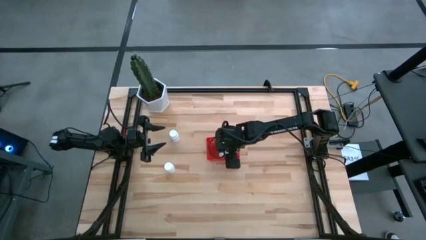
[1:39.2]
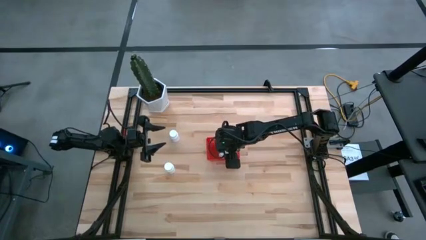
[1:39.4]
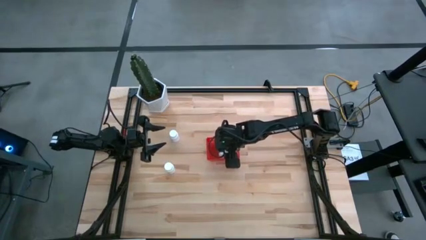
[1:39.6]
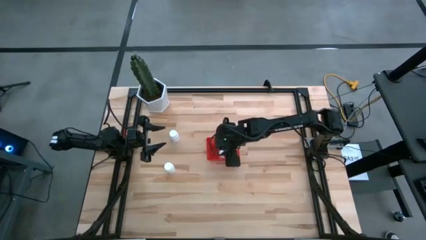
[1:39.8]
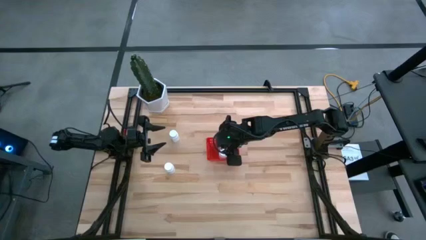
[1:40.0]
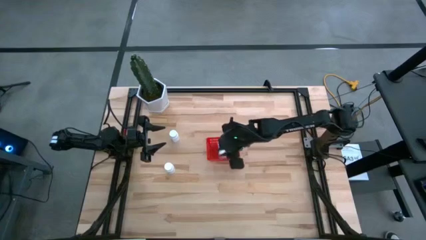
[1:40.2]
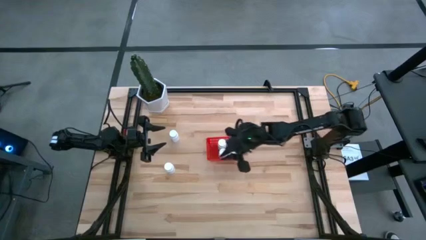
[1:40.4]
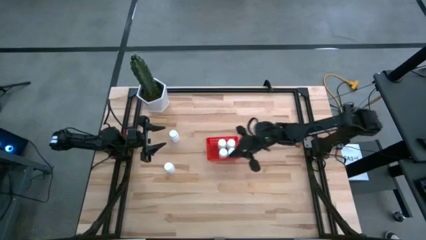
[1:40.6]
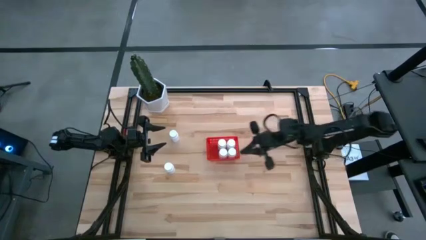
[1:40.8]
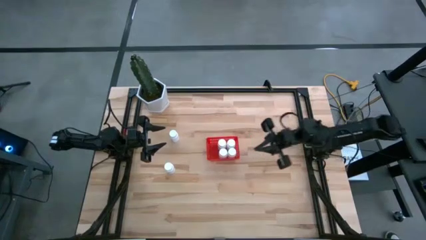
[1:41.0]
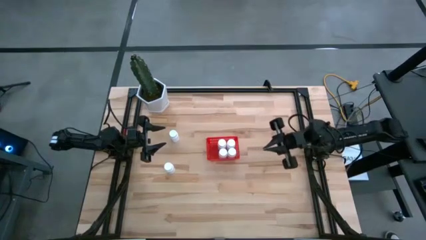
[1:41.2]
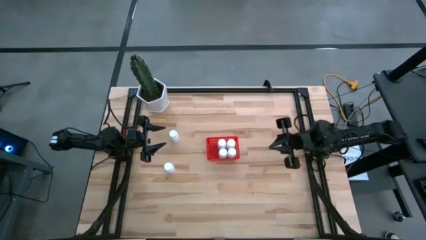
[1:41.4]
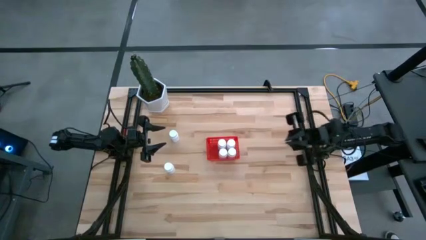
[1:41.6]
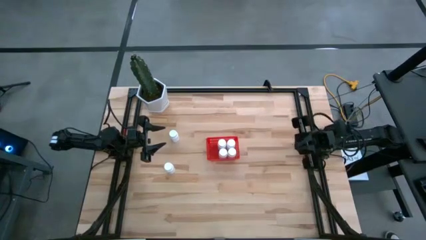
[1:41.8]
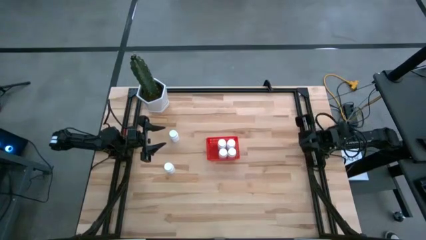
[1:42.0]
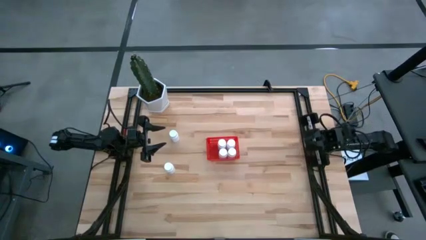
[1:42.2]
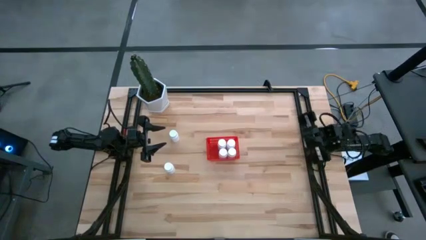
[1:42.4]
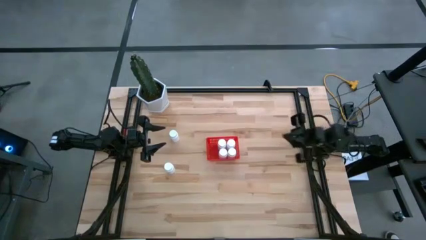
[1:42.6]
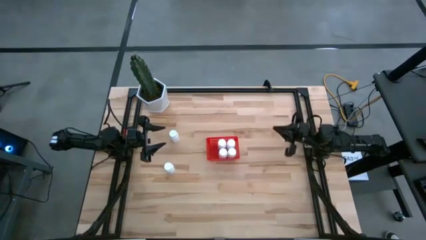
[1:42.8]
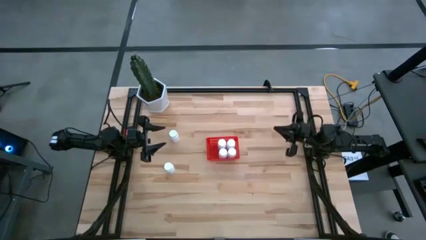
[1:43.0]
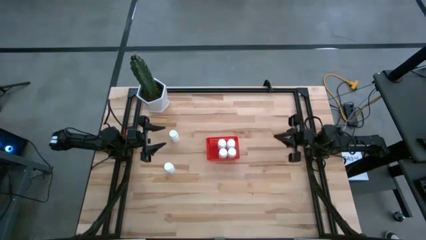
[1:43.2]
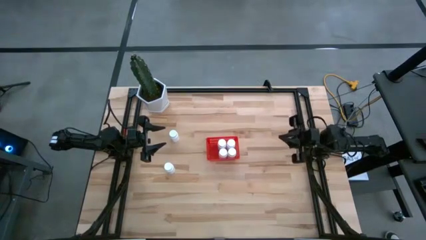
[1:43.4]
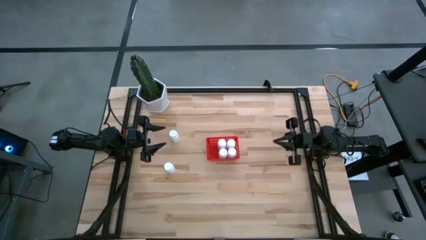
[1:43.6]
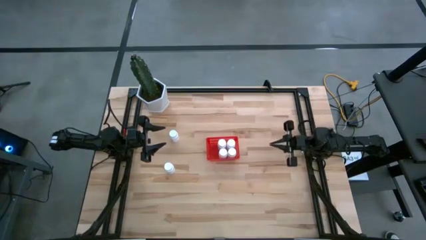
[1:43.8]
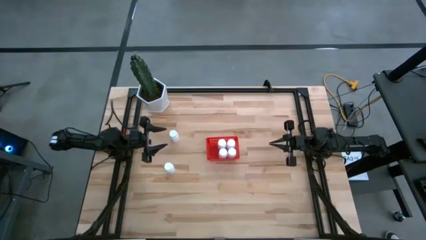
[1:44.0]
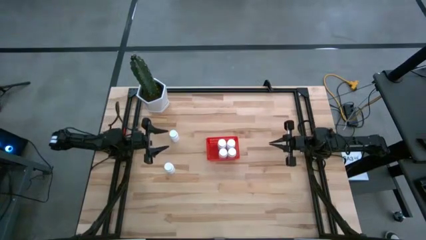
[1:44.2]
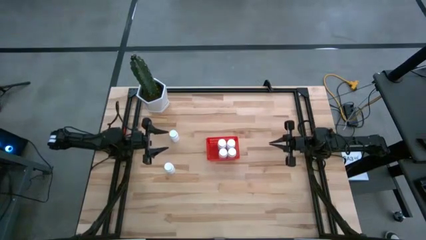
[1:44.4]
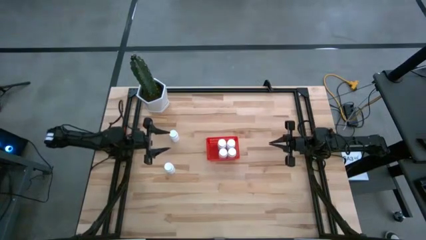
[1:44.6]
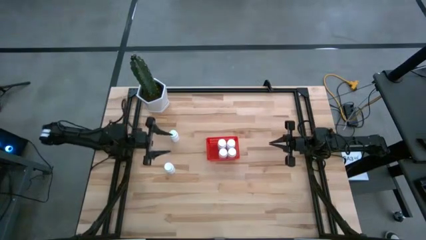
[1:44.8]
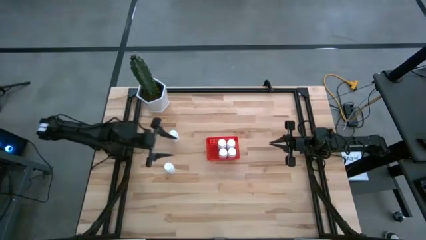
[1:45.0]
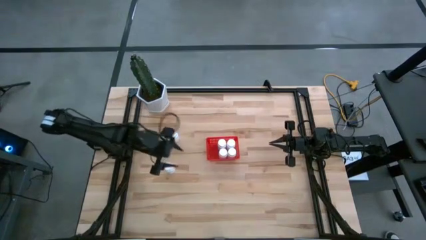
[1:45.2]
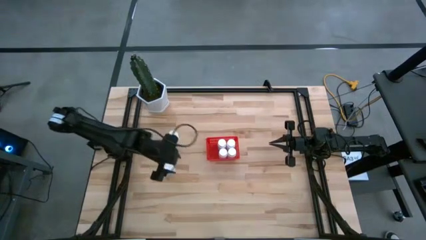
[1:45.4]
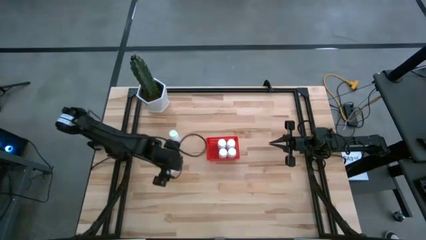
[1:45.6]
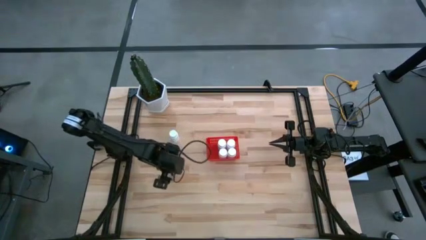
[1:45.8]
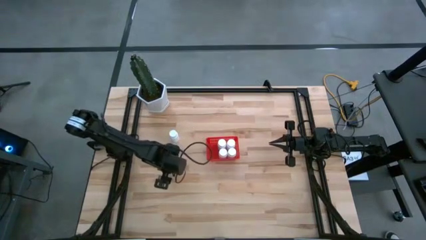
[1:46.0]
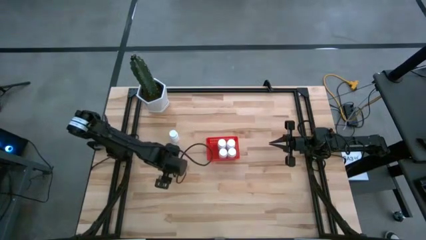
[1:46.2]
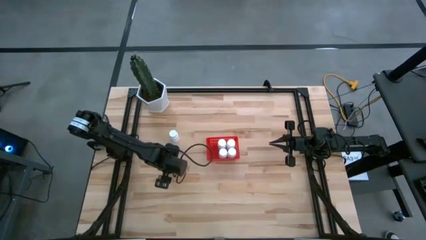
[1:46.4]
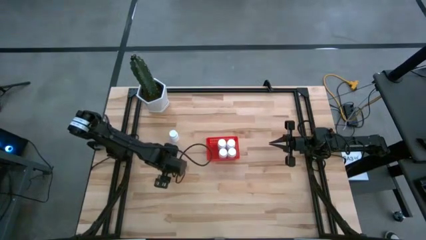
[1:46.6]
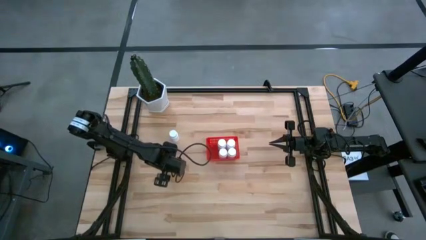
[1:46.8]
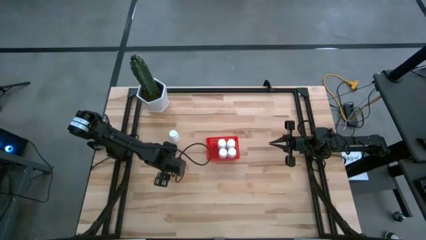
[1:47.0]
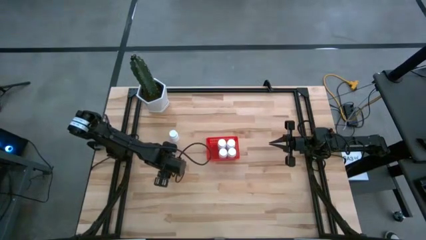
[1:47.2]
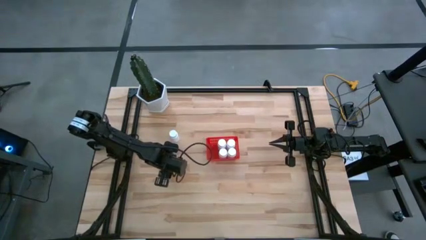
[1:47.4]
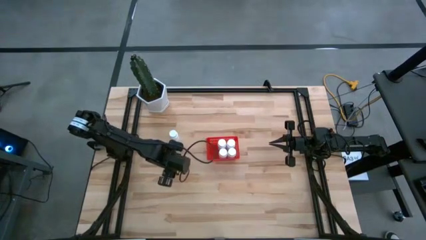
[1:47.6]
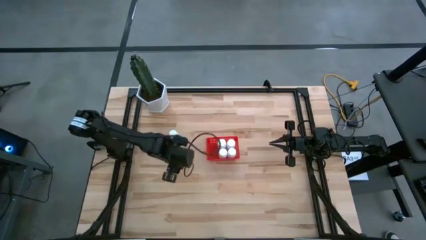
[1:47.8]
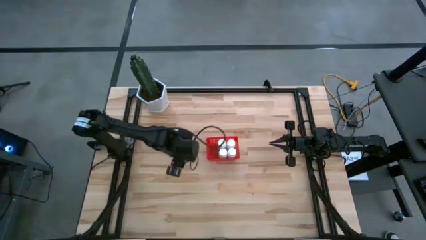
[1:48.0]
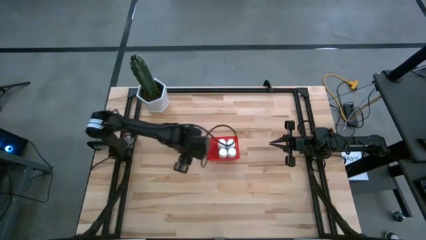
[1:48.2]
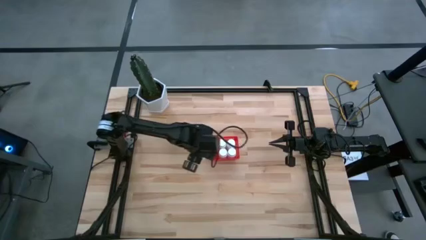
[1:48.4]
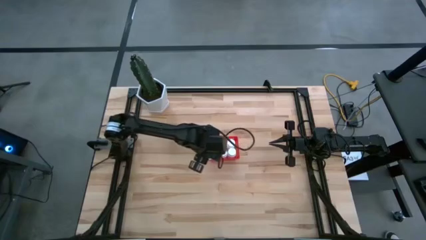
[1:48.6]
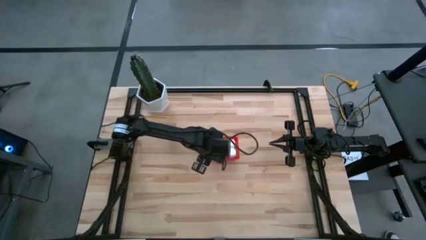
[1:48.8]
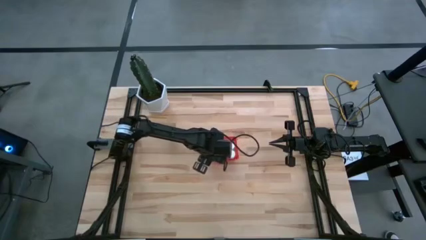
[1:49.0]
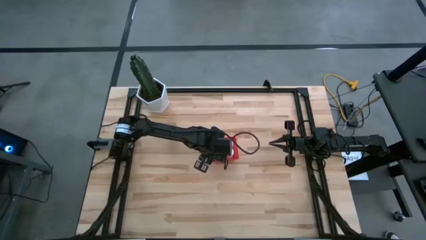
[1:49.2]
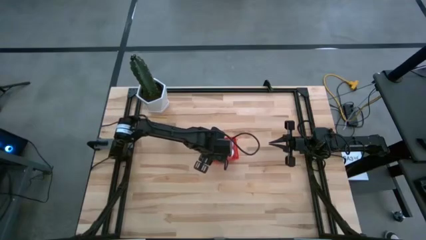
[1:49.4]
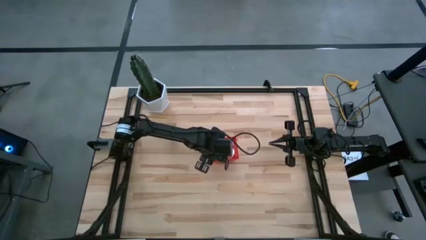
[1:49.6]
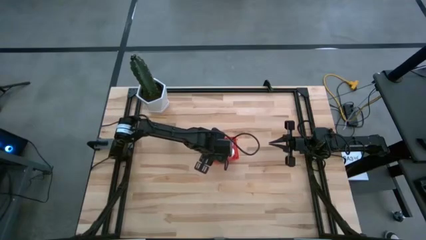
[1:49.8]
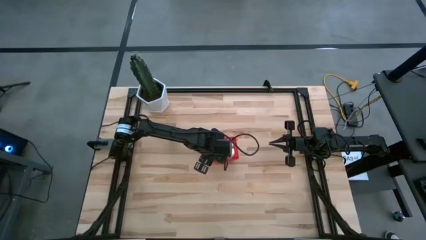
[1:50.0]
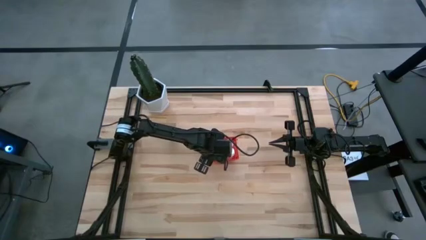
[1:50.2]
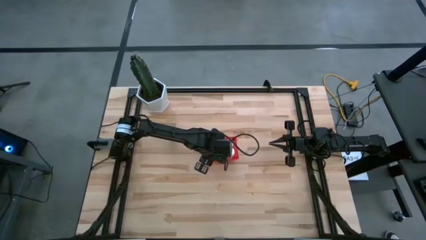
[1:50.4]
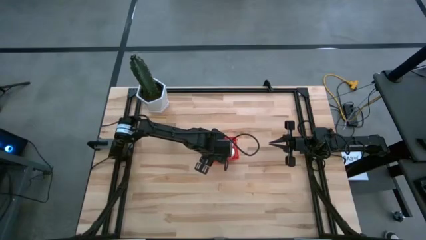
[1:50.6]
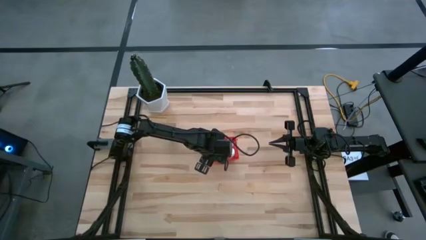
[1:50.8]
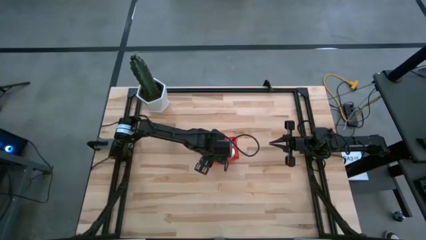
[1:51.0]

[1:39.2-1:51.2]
Task: Pick and place pill bottles into a basket
Put the white pill bottle into the red bin

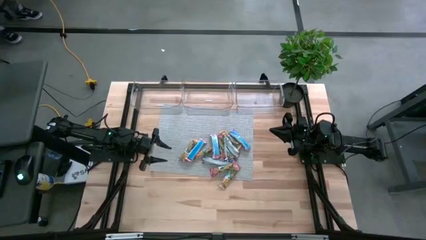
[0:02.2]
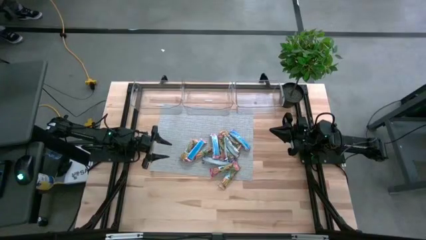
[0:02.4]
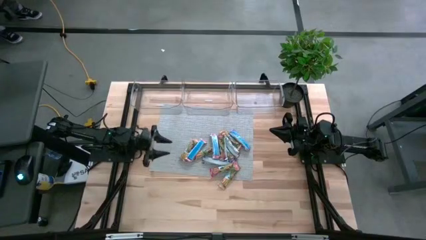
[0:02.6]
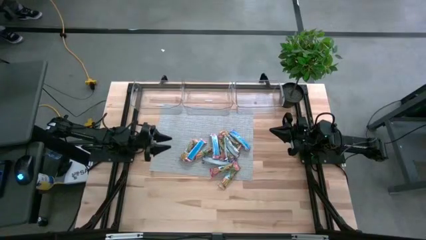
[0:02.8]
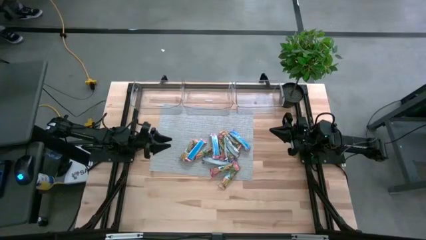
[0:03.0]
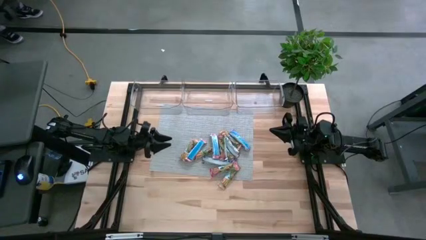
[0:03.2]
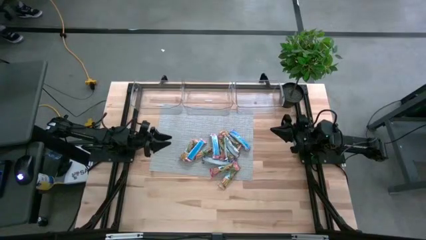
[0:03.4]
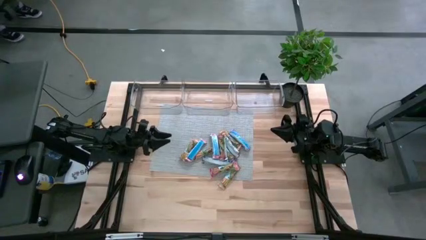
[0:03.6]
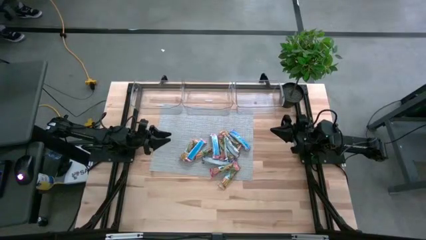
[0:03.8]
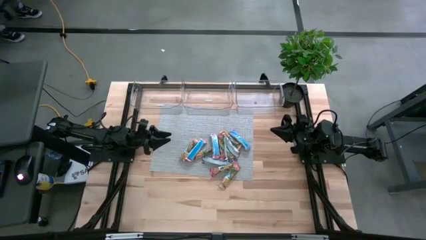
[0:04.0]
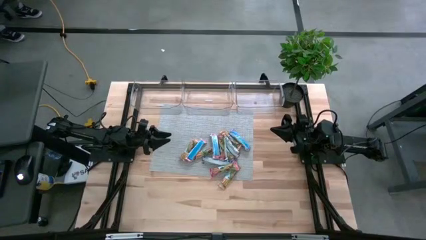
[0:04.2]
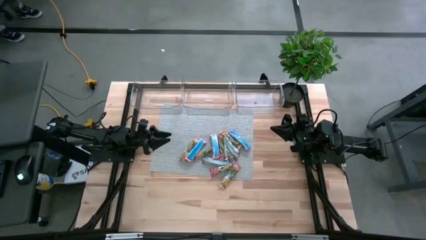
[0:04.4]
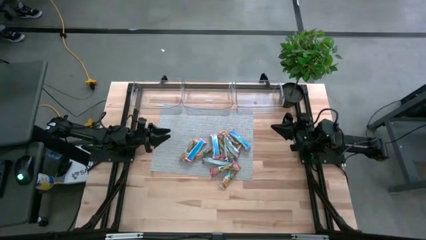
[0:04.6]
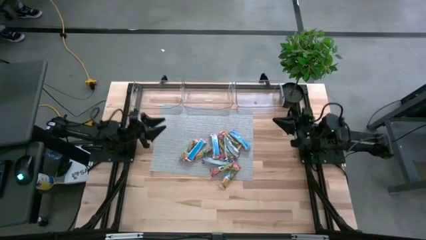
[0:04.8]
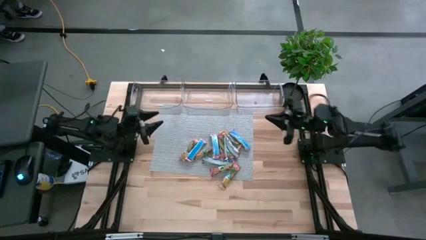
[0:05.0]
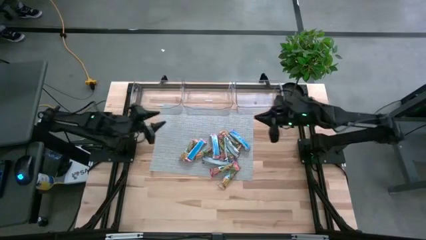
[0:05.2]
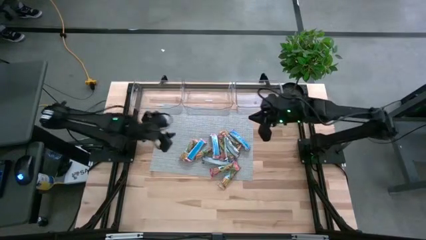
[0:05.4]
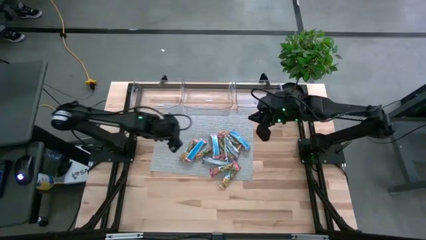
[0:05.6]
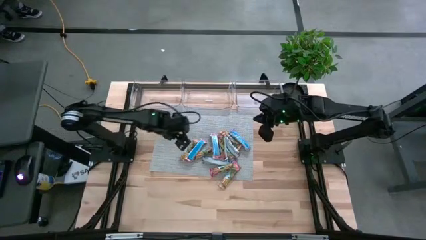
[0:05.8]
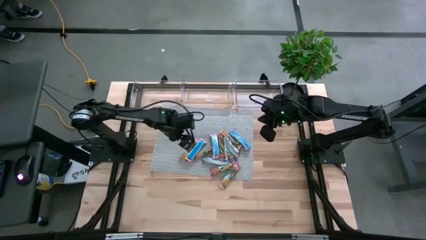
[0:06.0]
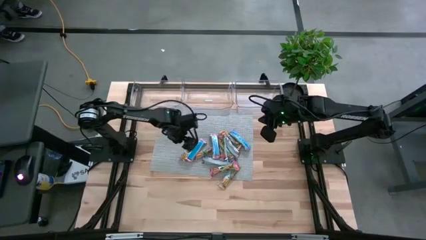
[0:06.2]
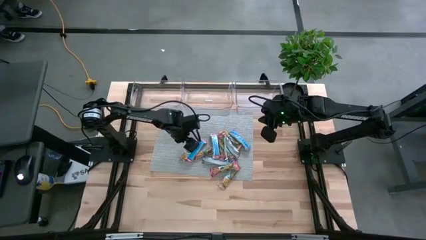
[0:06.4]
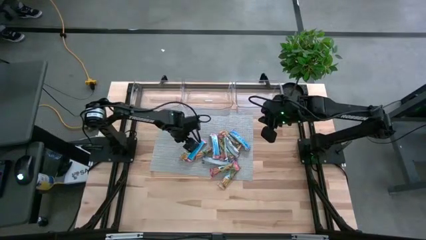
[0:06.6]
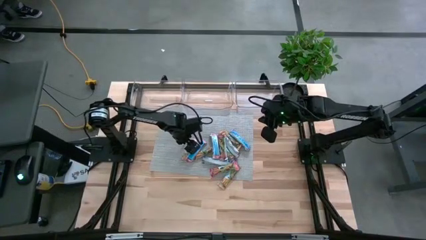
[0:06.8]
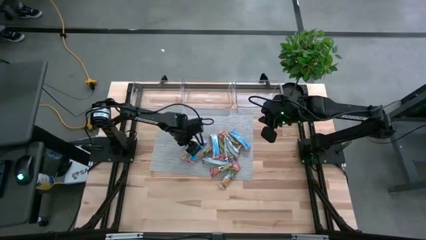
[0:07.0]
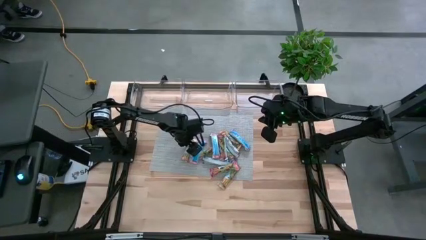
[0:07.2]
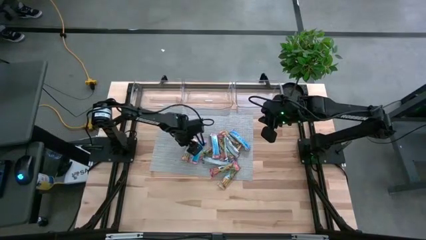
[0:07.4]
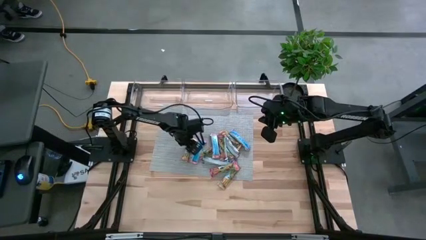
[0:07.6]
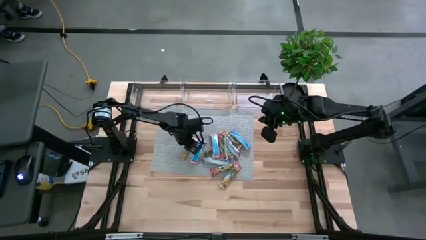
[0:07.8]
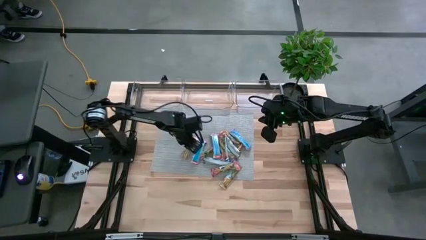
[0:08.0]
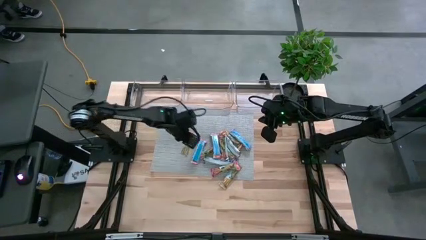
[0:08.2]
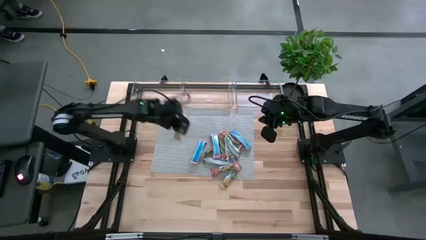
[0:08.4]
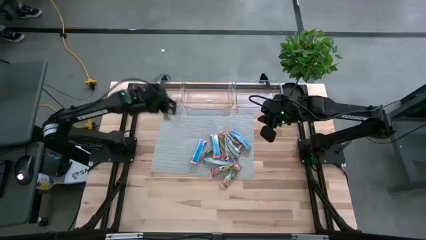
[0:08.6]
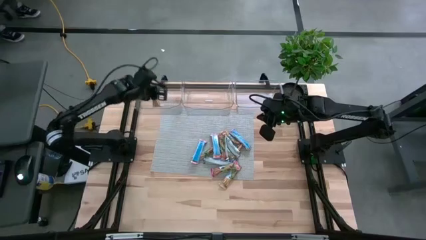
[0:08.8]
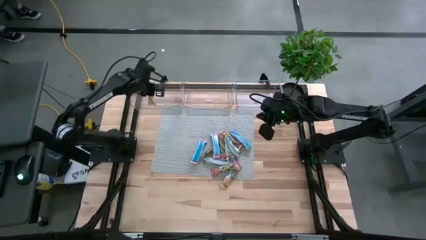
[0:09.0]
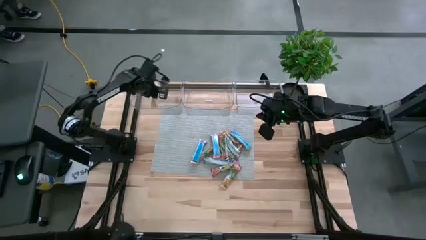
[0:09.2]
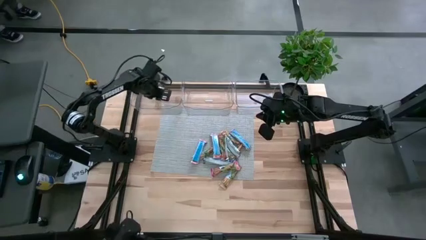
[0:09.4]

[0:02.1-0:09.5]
Task: Pick and place Granola Bars by type
Put the yellow granola bar into the left transparent bin
